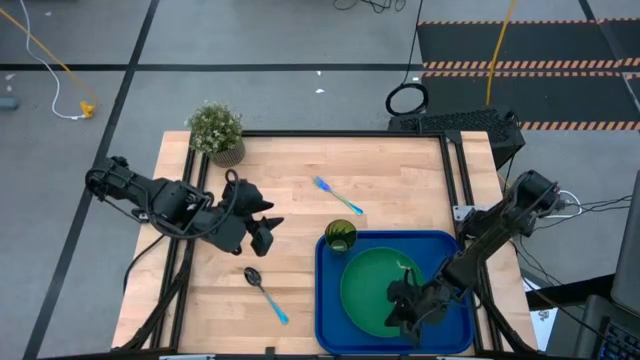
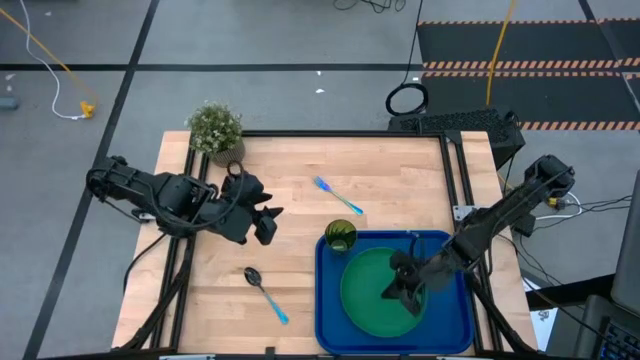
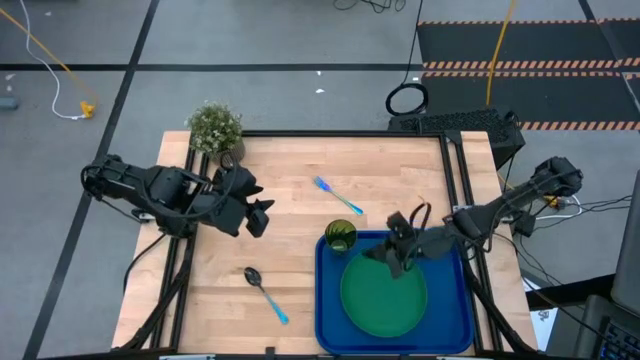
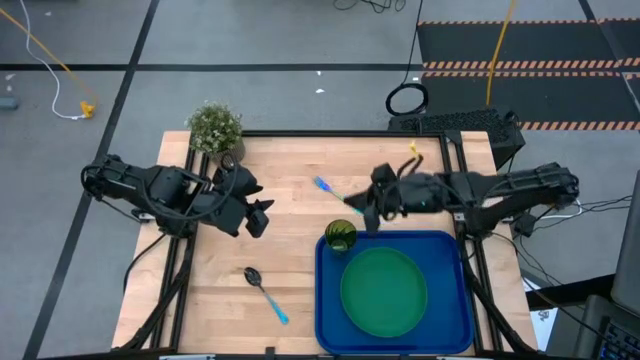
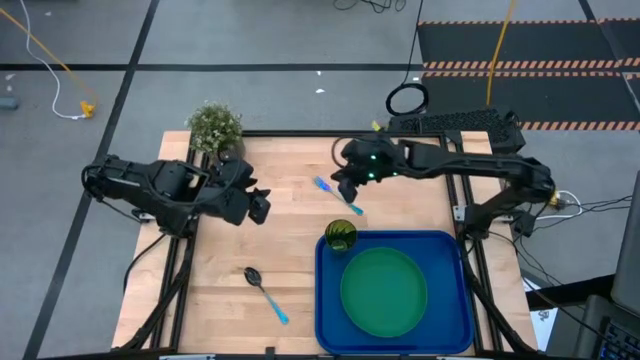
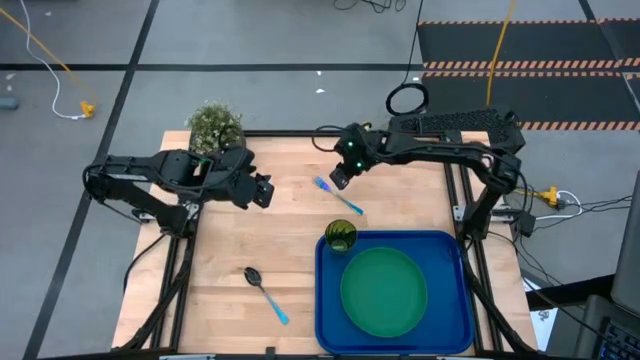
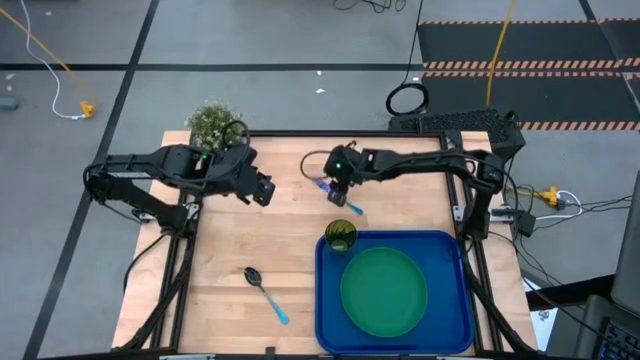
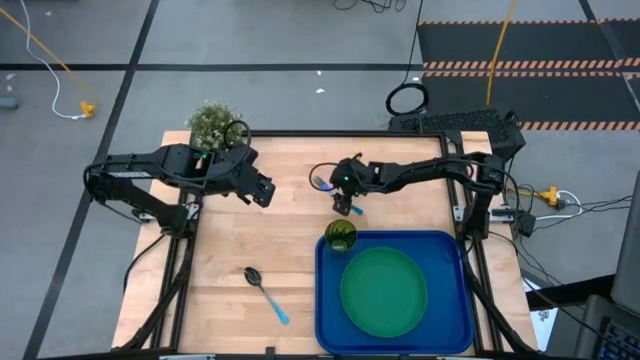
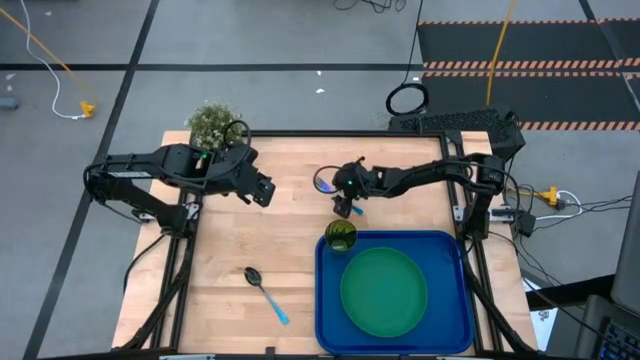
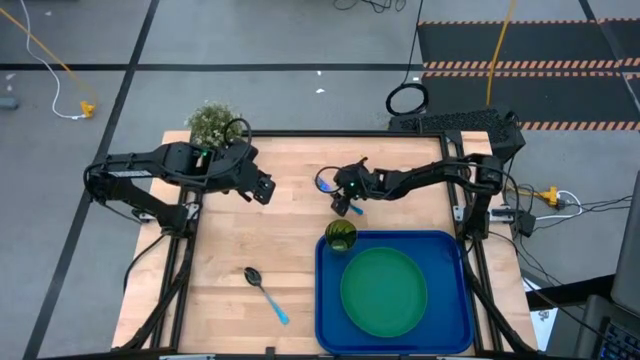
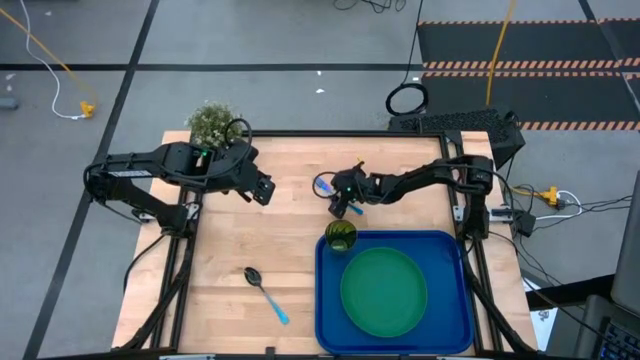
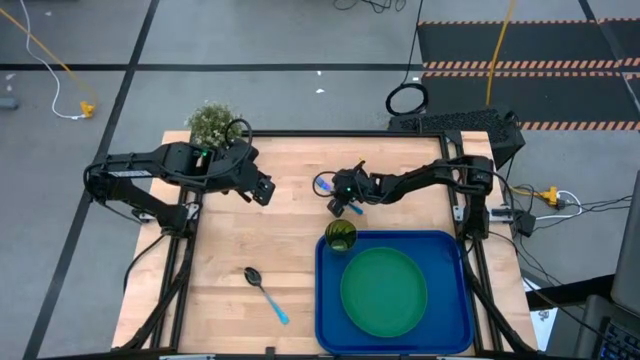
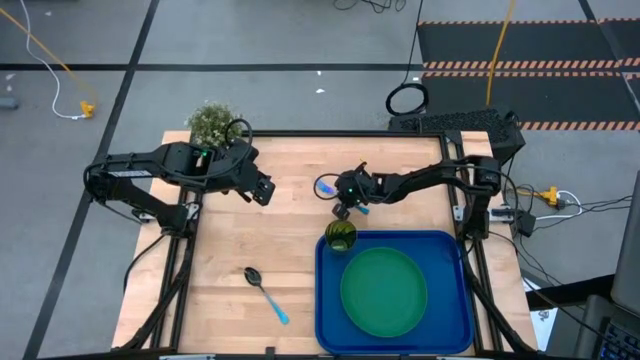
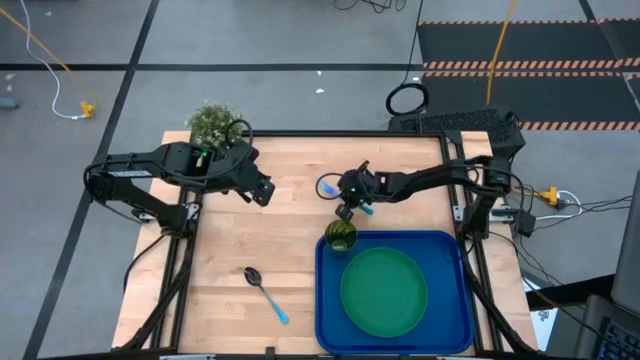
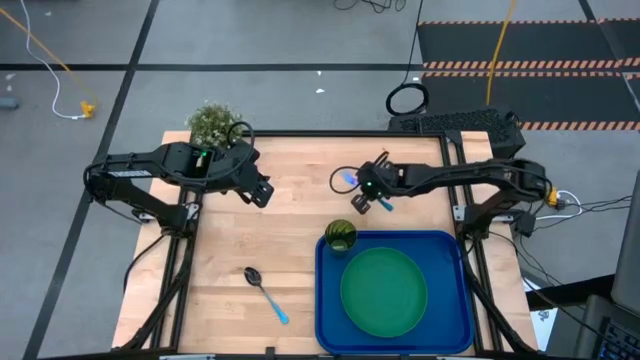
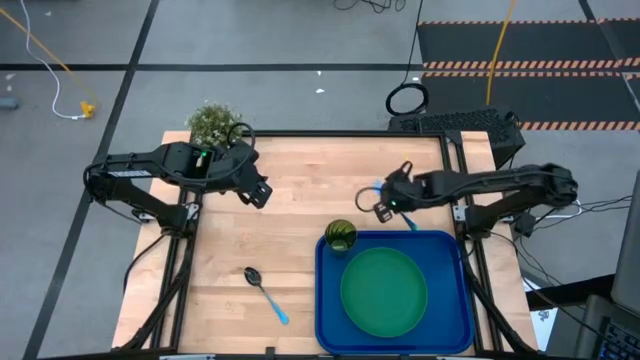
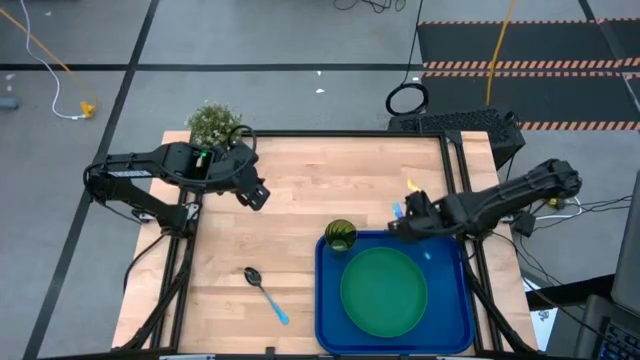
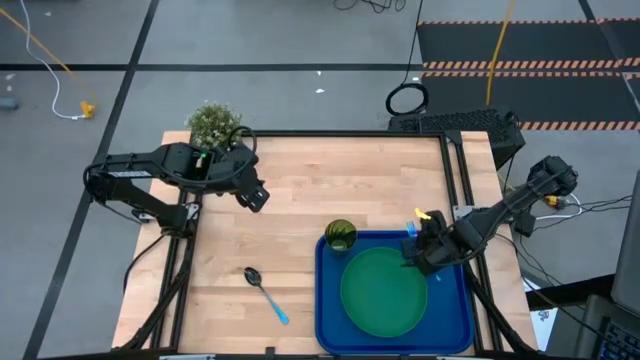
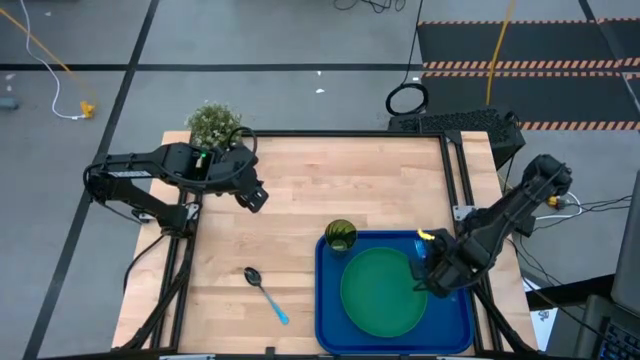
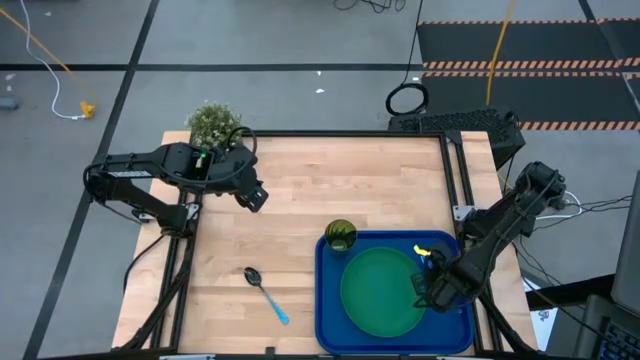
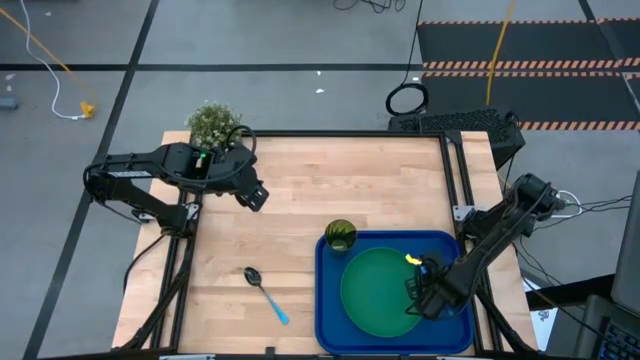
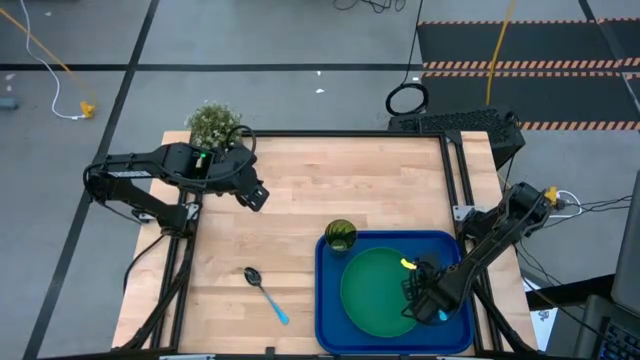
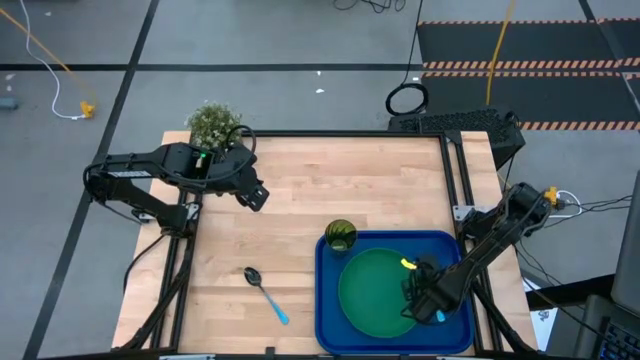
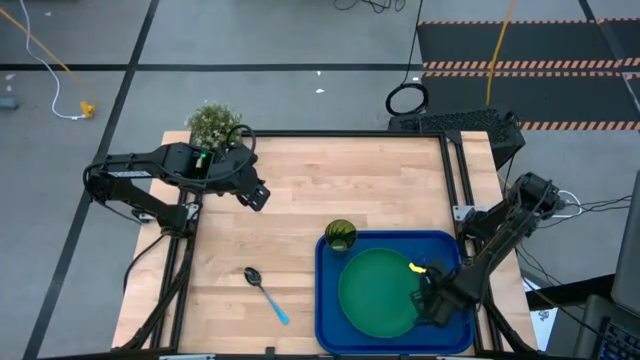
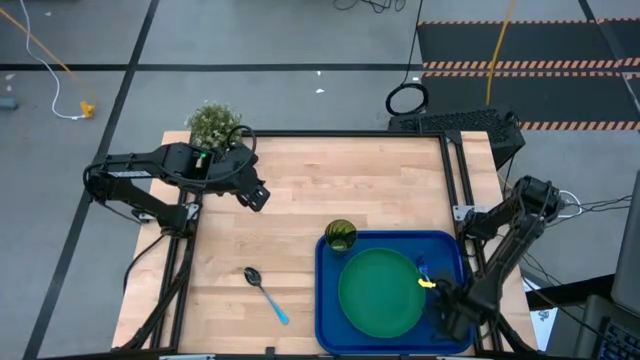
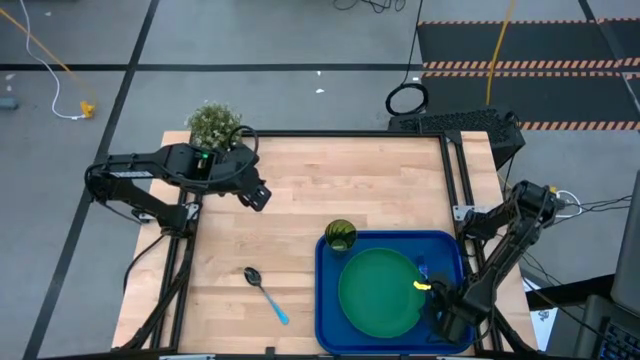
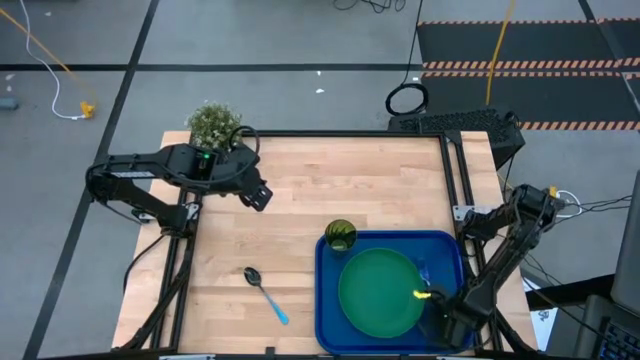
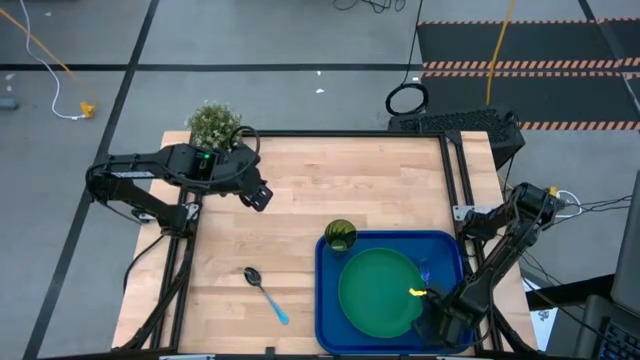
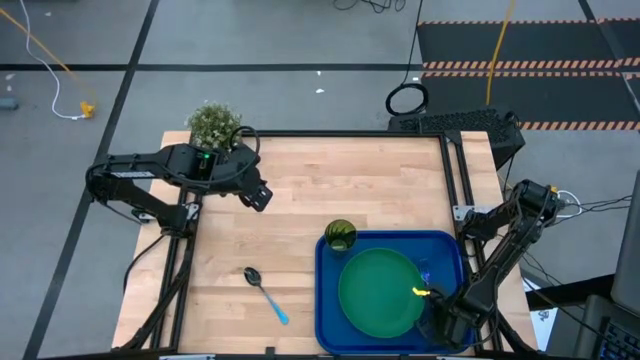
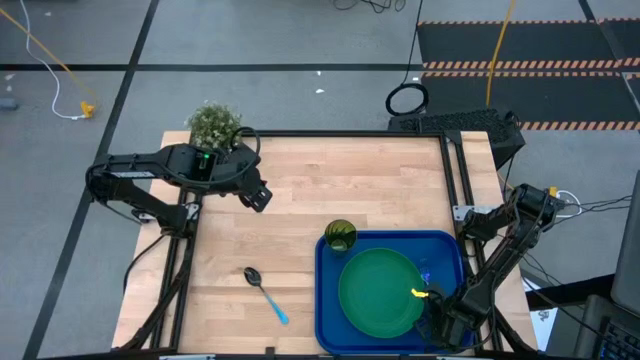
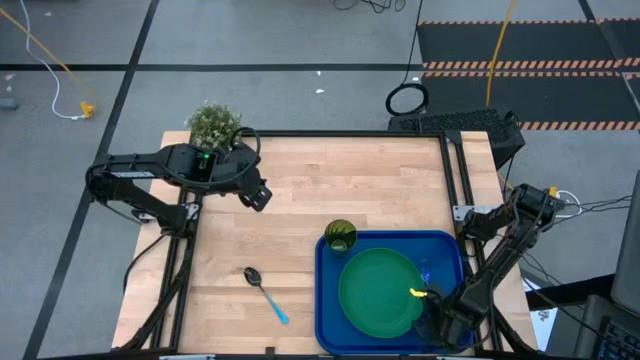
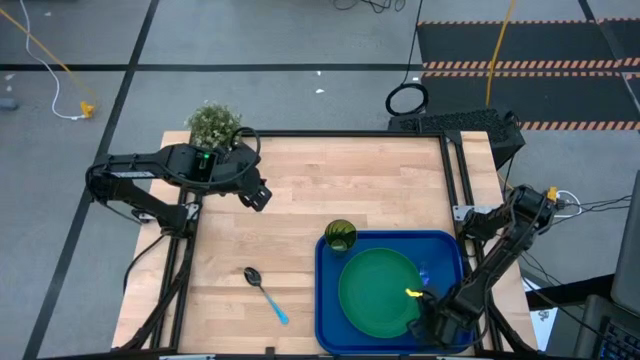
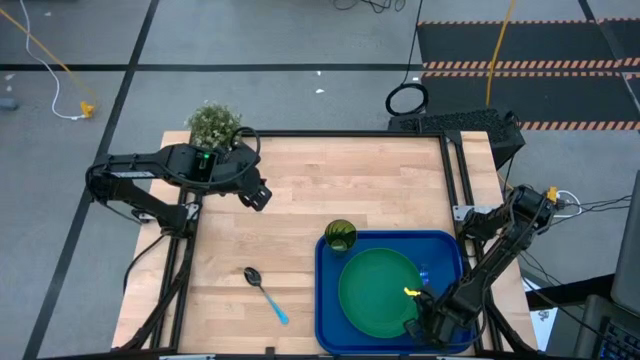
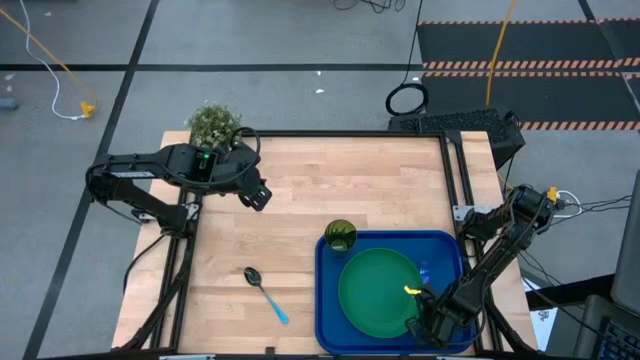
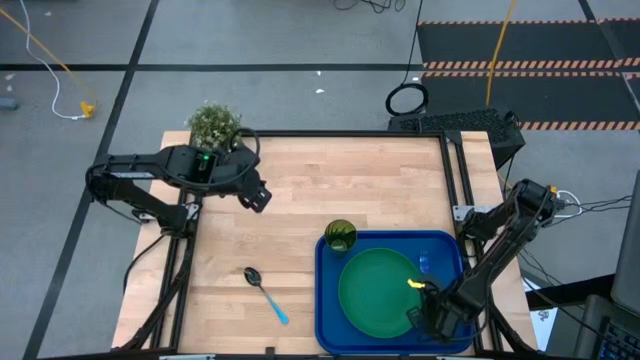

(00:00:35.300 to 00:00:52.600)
Task: Pick and place plate/cup/fork/spoon on tray
Put the blue fork on the blue tray to the right of the green plate

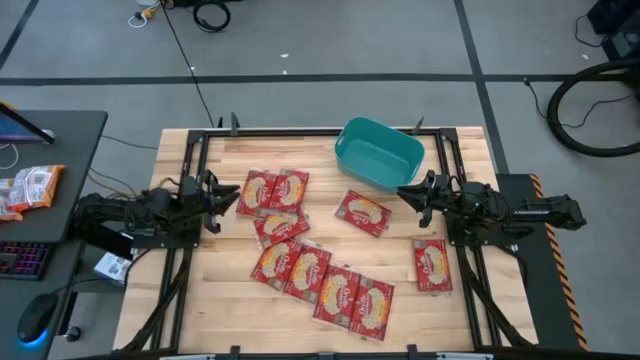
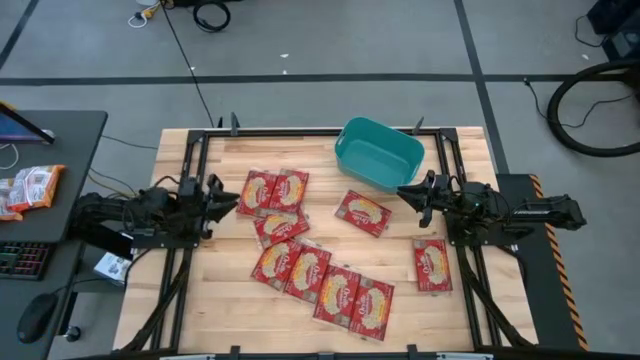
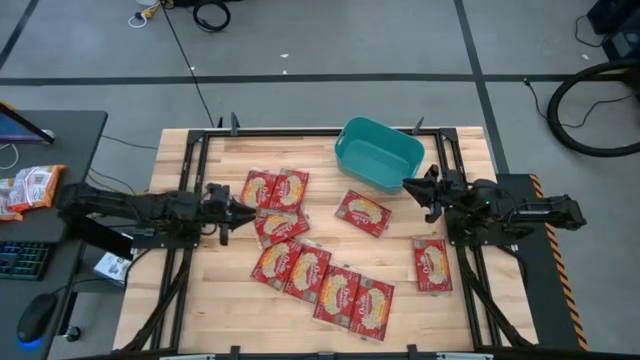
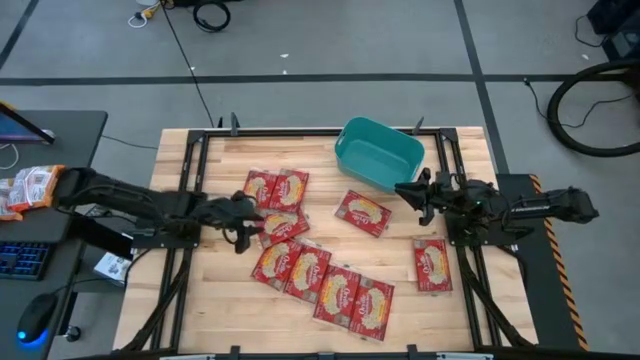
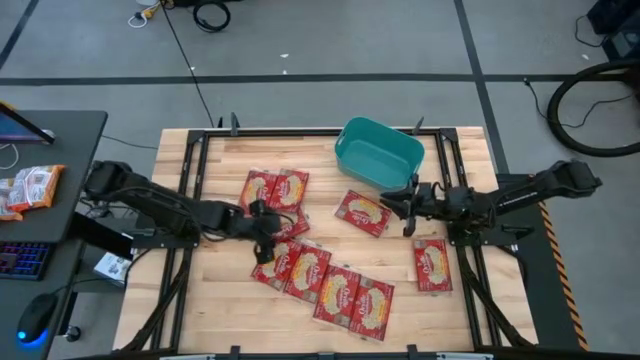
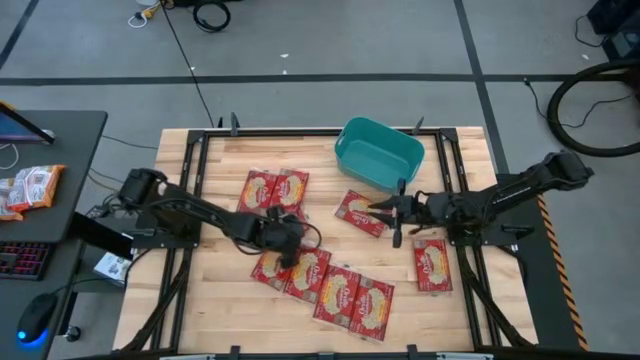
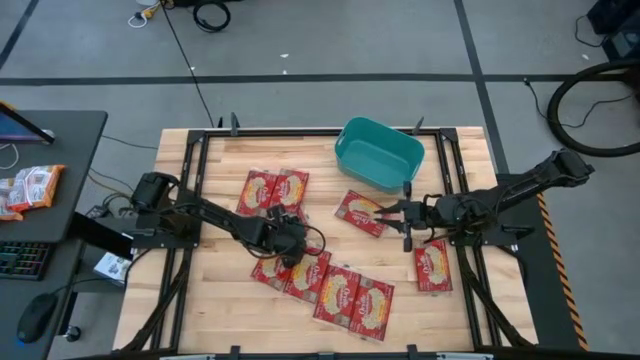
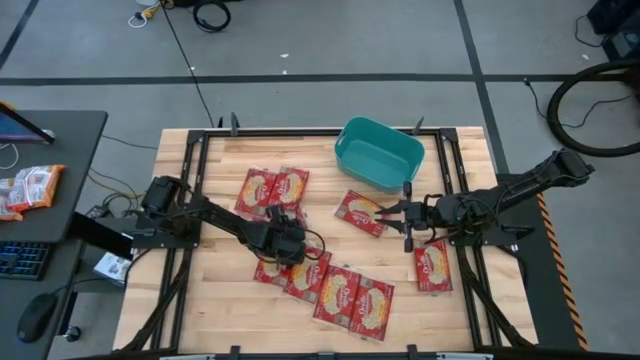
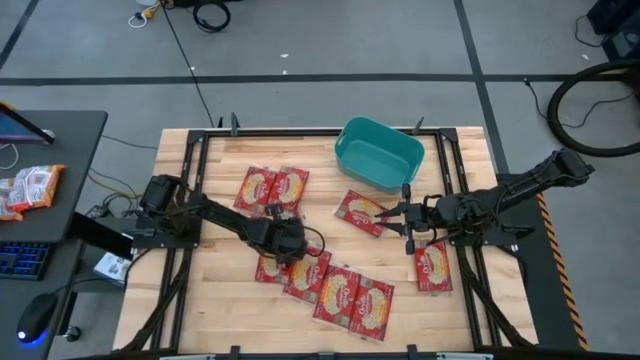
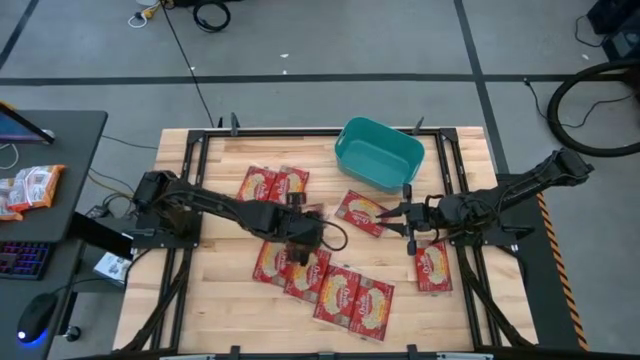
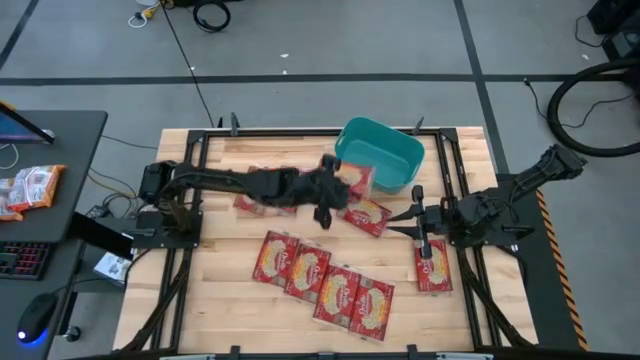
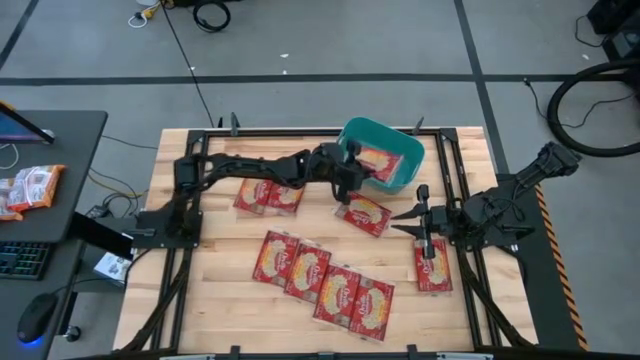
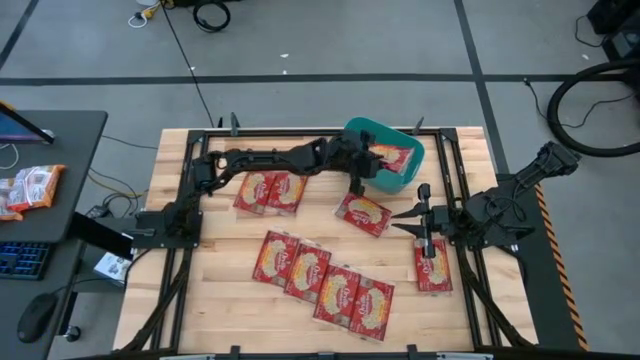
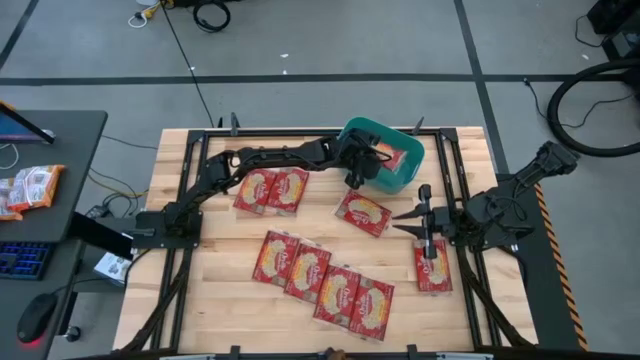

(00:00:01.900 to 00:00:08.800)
Task: Sort popcorn bags into baskets
Put the popcorn bag into the bin
